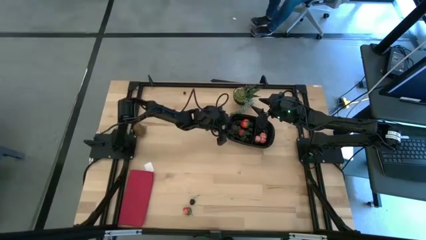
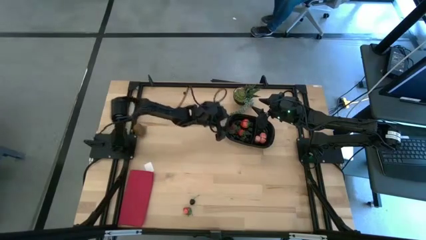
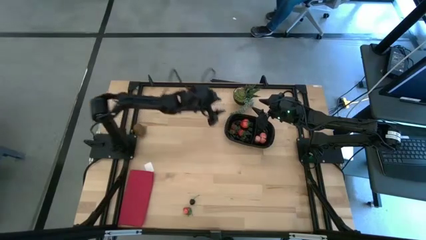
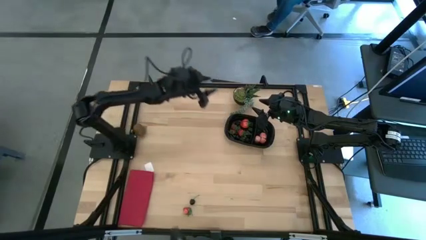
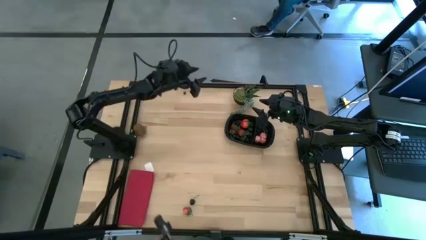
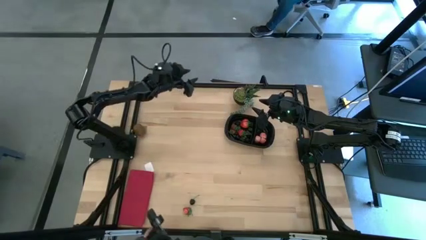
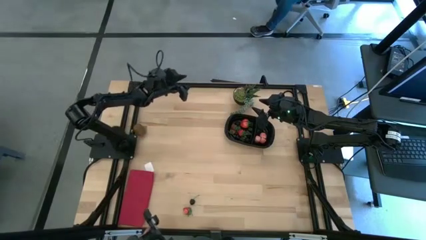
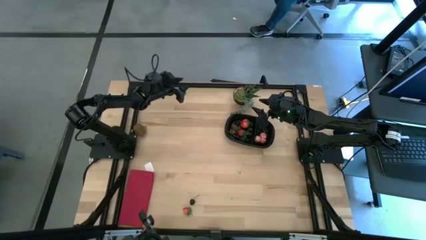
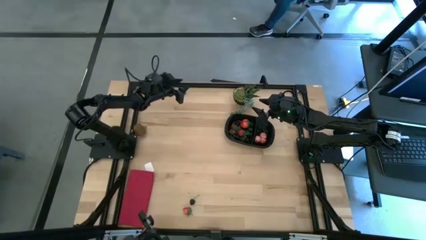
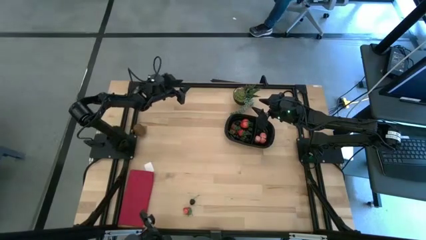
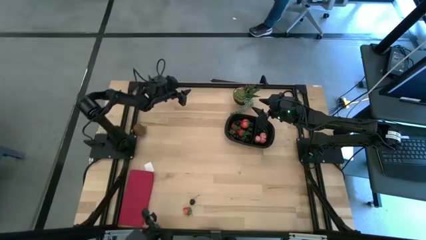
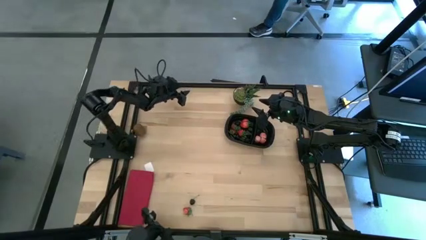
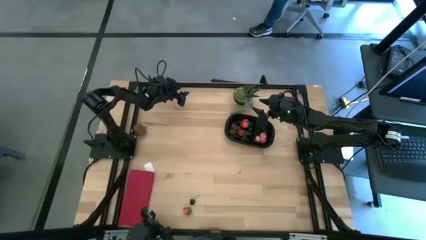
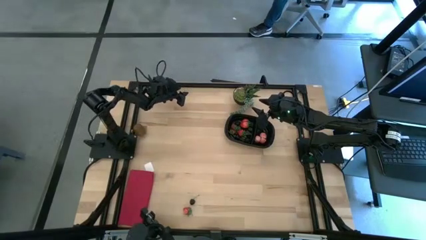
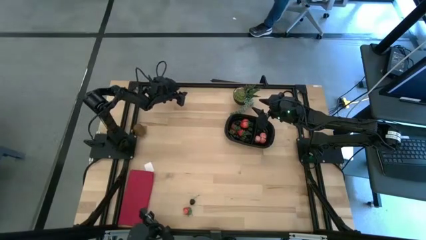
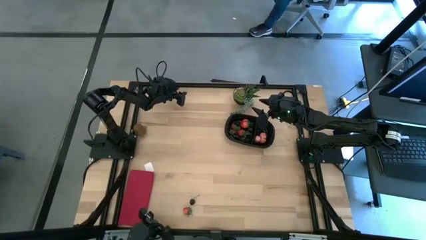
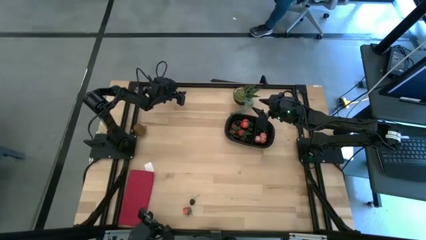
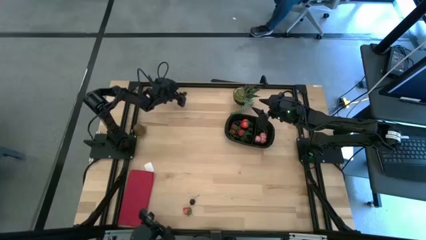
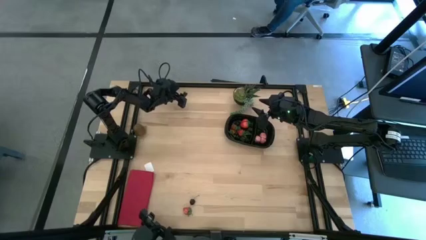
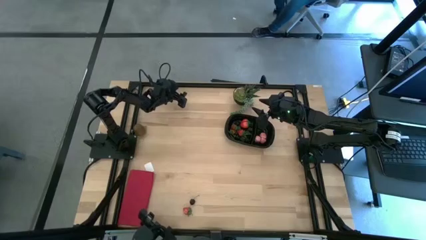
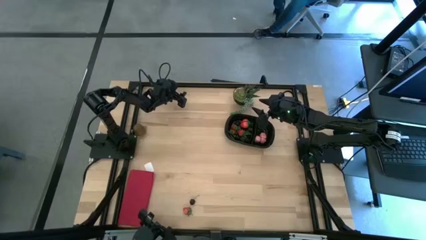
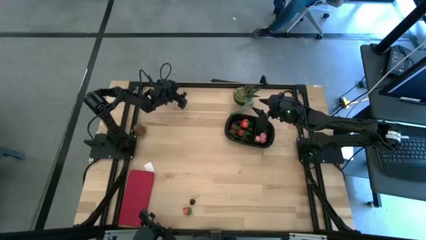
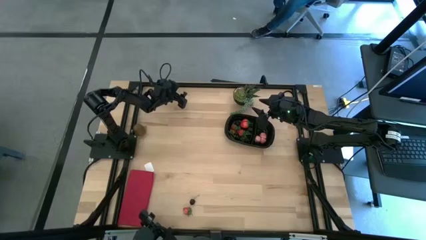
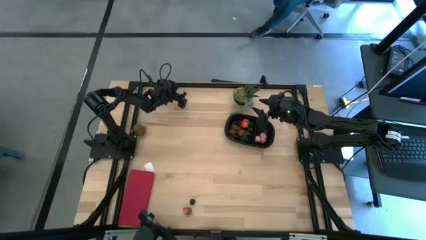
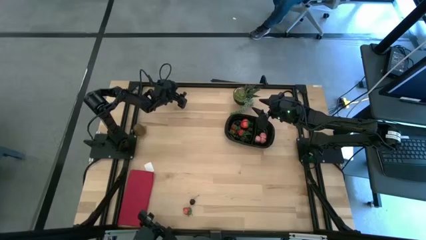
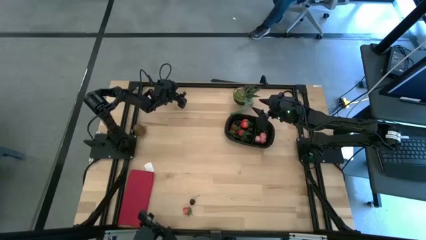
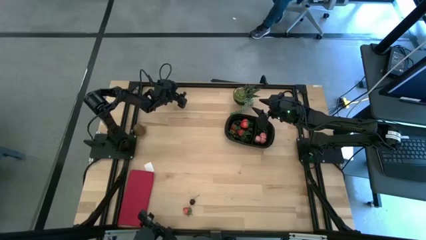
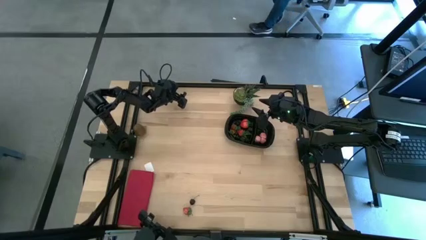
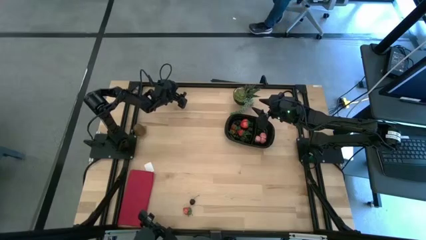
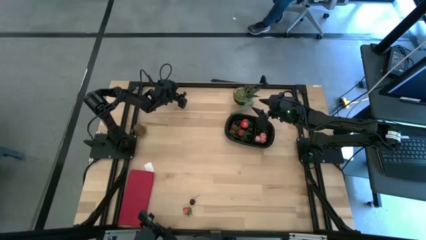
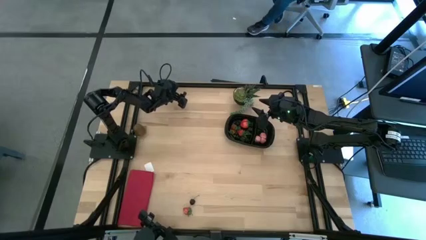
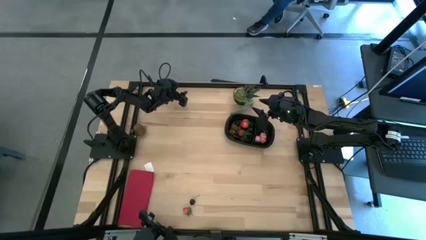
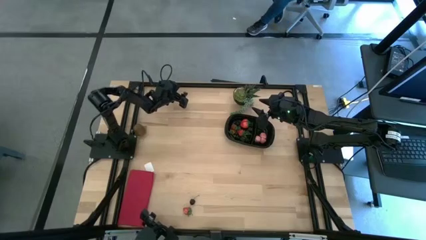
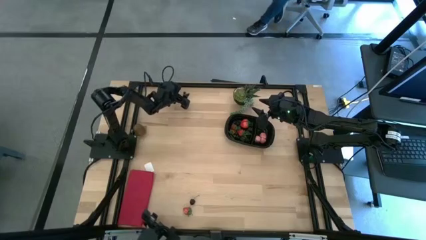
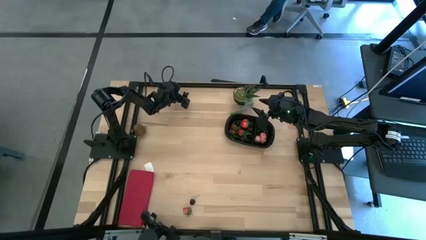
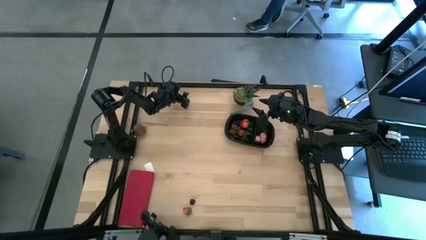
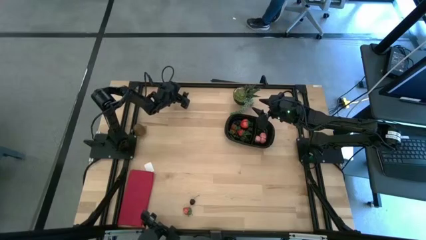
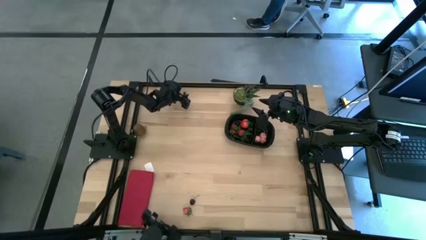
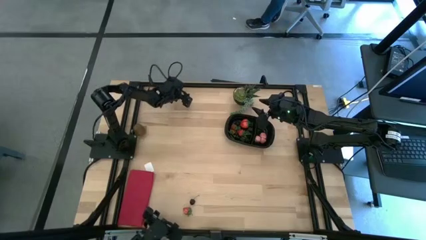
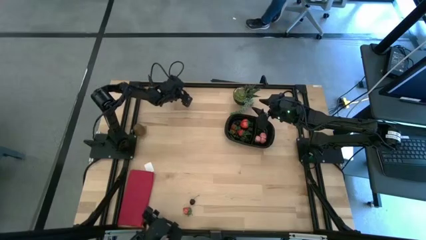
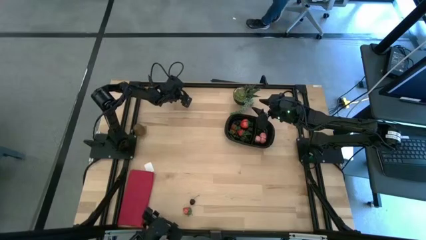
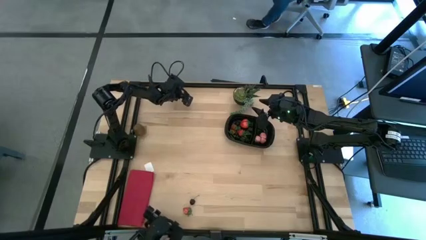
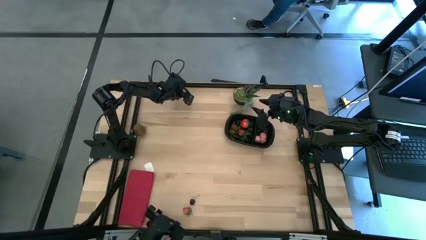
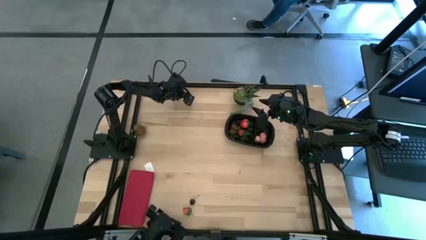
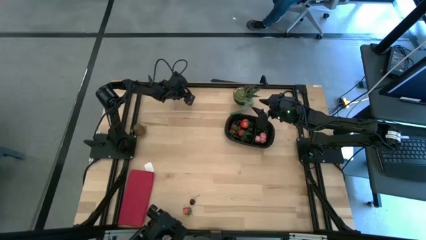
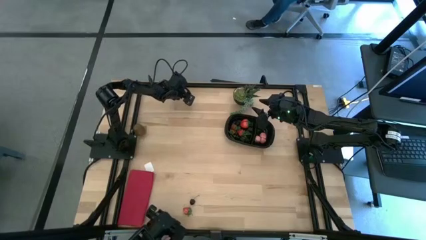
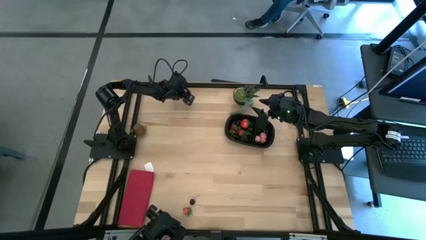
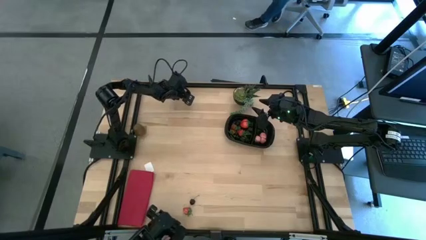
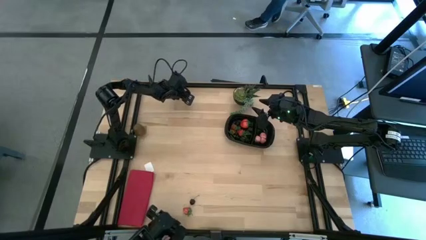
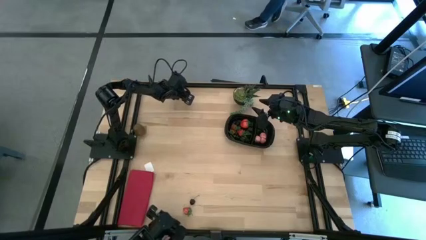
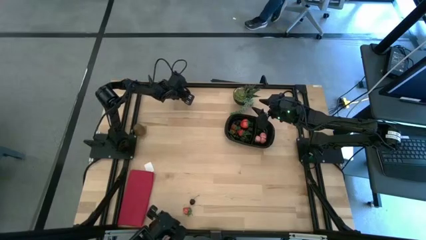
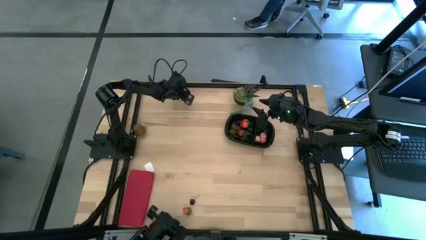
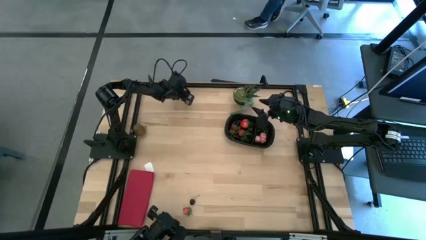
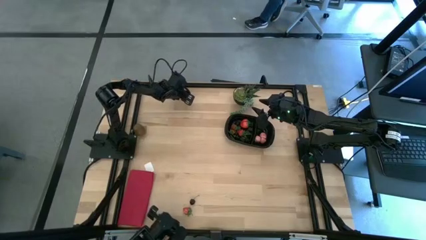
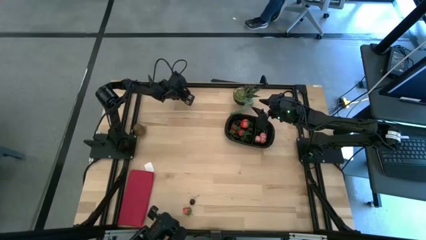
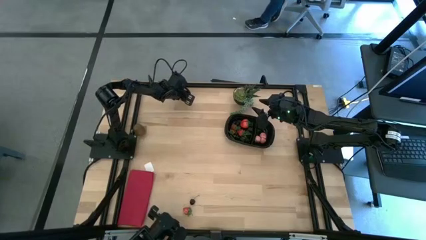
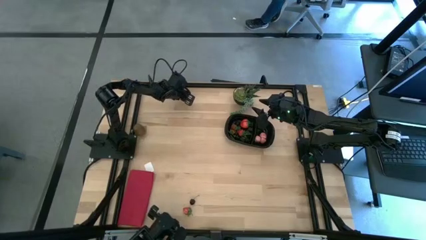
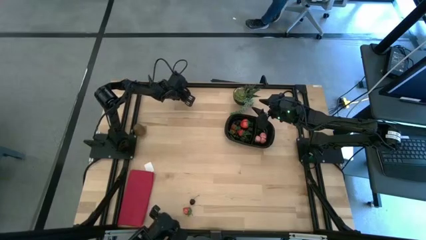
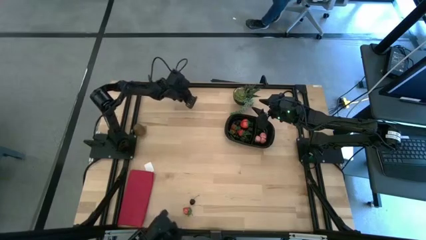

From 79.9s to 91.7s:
Task: Pick and placing Produce into tupperware
Put the blueberry into the of the black bin

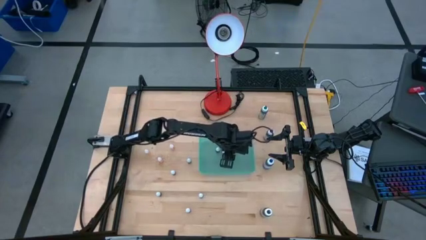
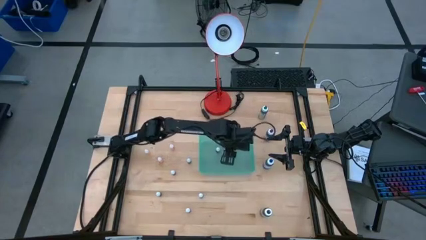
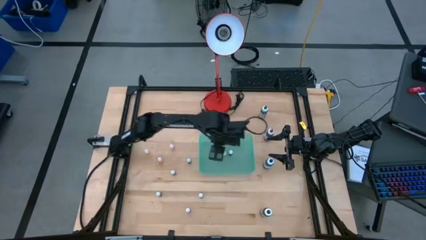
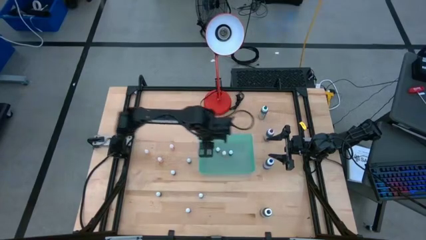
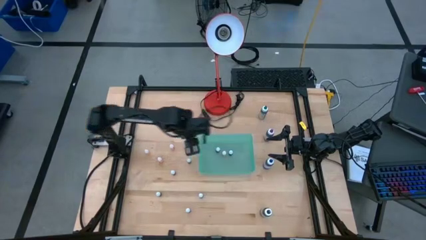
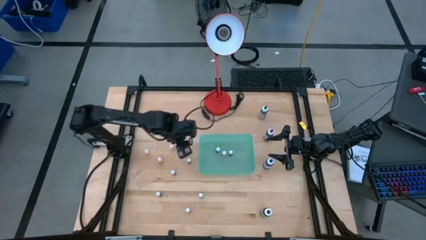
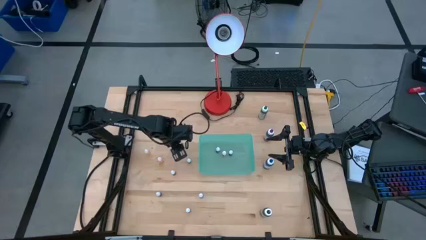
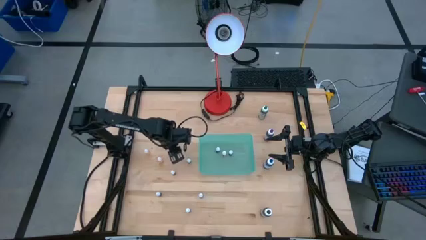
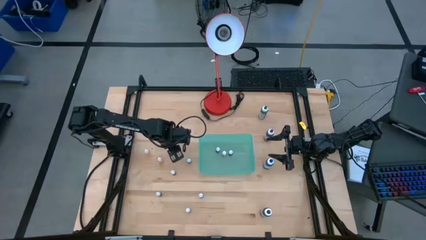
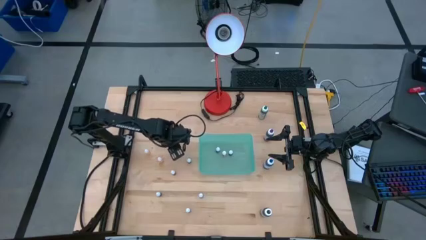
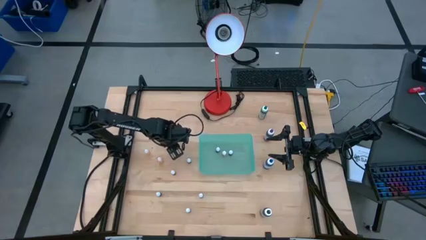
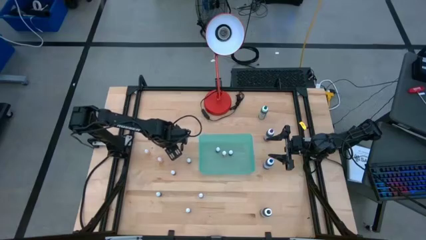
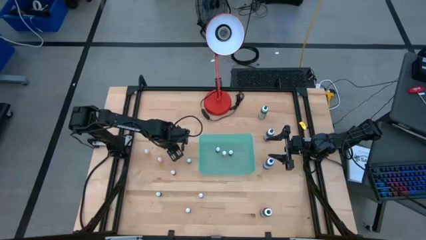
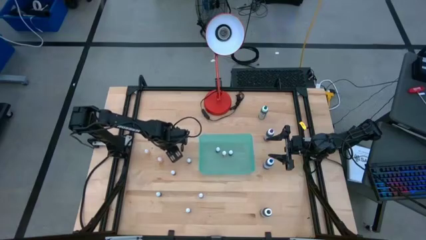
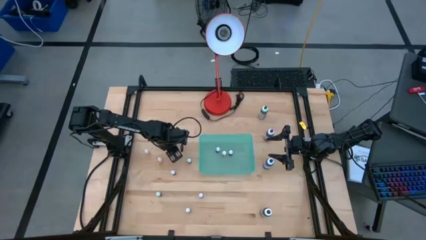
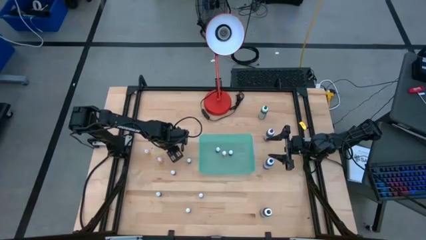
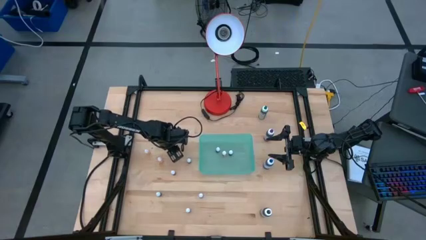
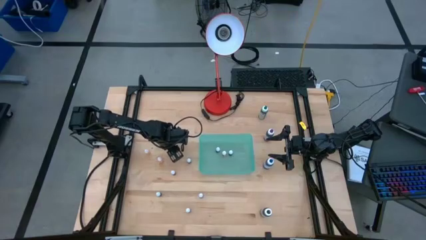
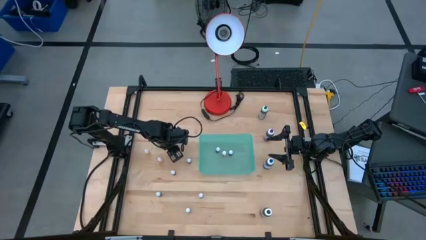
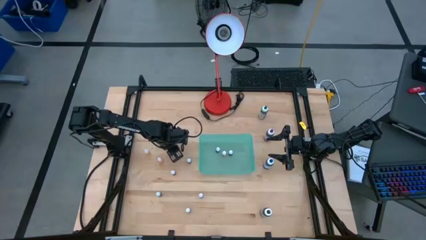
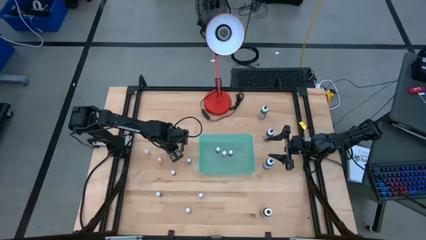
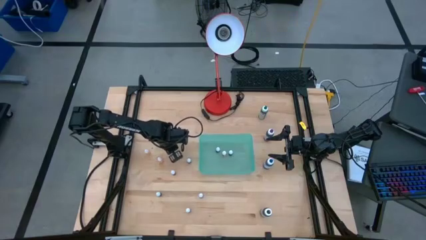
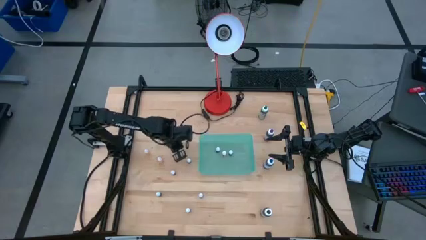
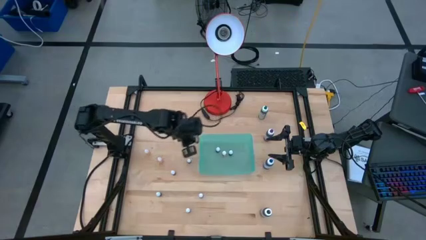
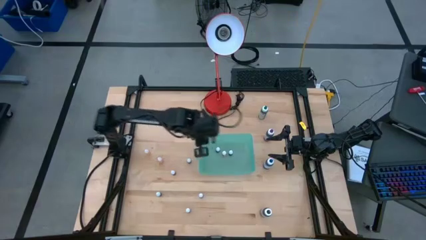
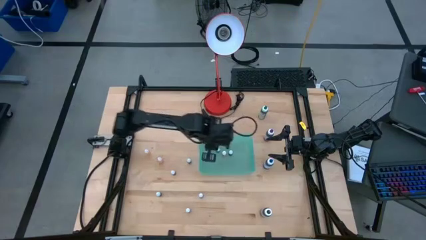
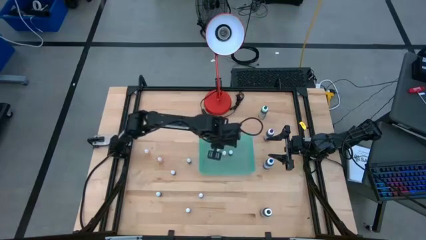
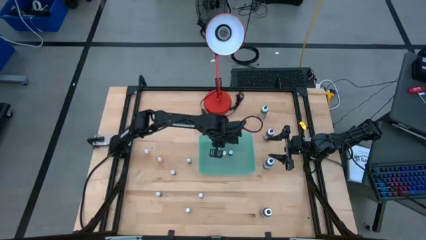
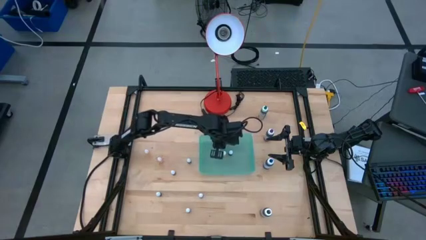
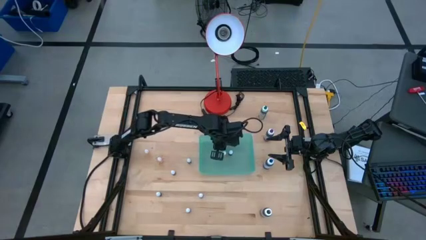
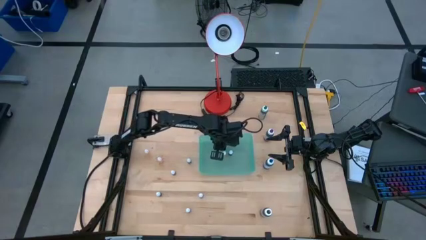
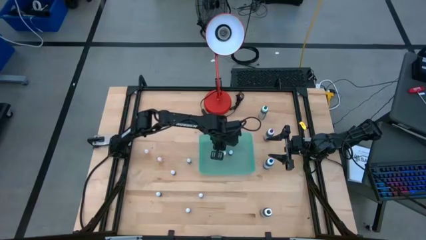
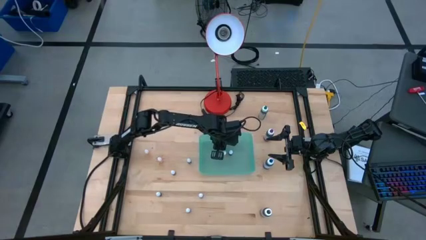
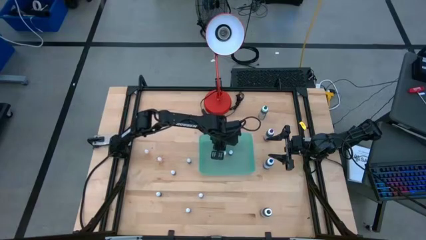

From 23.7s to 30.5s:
Task: Pick & Place food coloring
Put the small orange food coloring bottle into the green bin
